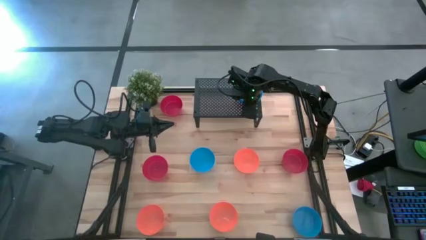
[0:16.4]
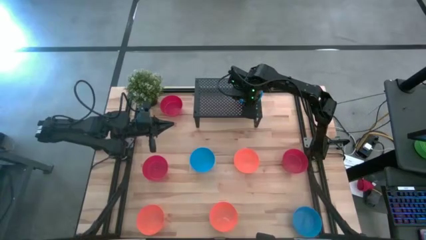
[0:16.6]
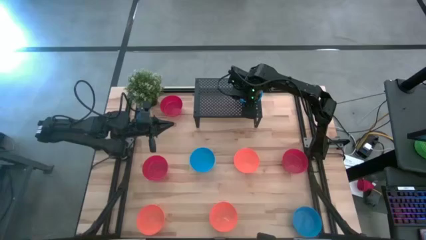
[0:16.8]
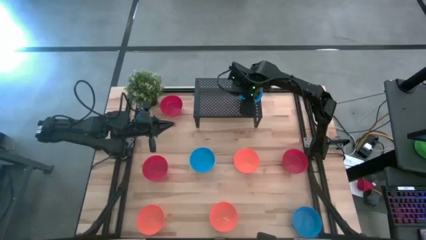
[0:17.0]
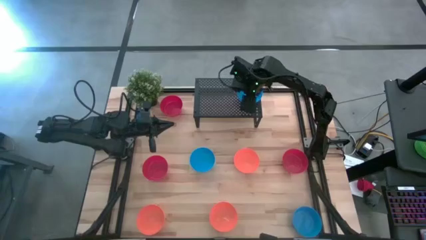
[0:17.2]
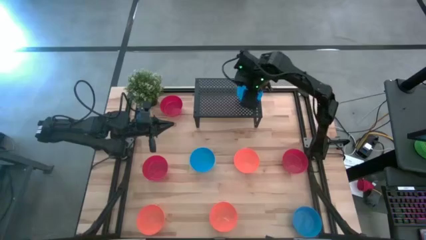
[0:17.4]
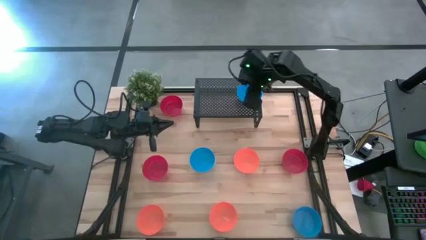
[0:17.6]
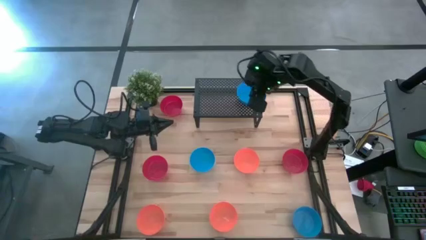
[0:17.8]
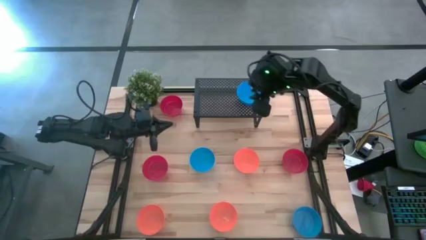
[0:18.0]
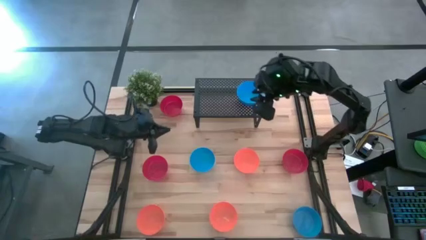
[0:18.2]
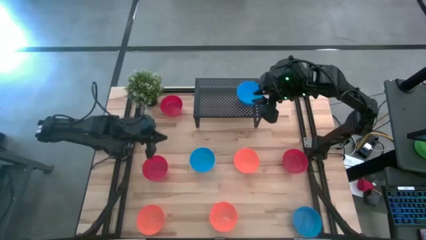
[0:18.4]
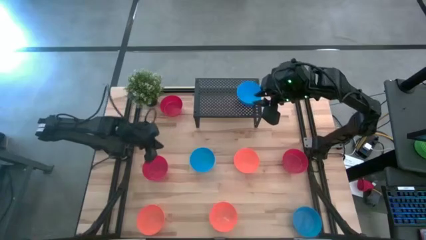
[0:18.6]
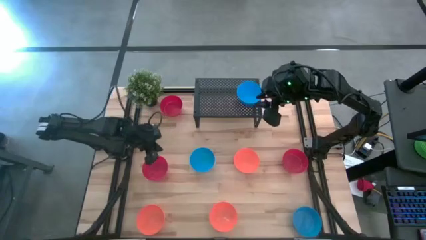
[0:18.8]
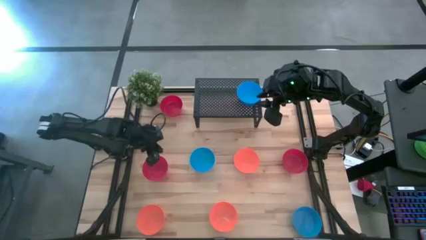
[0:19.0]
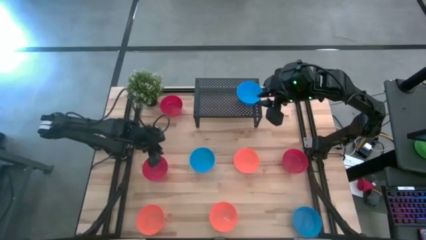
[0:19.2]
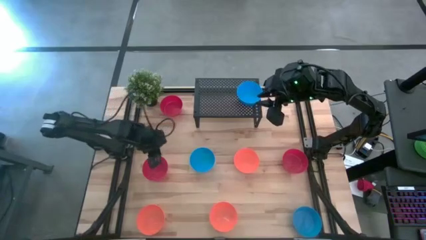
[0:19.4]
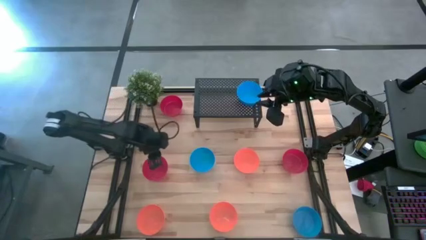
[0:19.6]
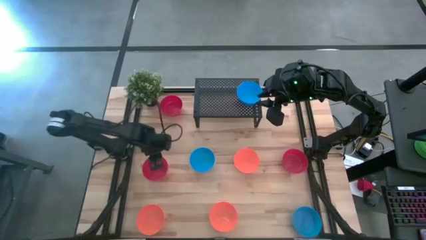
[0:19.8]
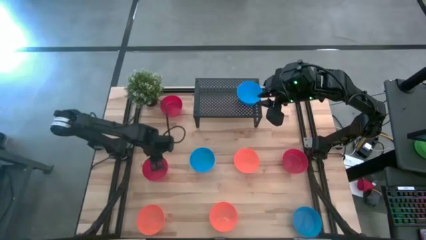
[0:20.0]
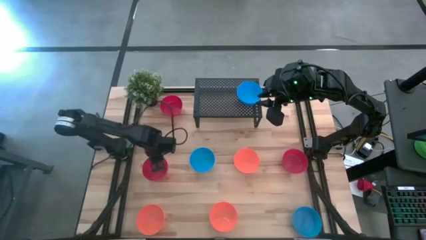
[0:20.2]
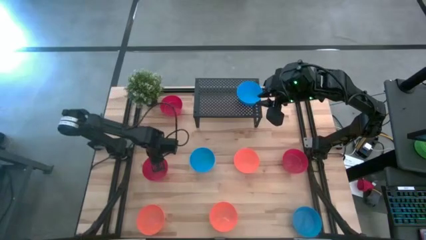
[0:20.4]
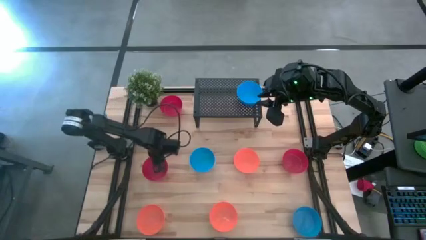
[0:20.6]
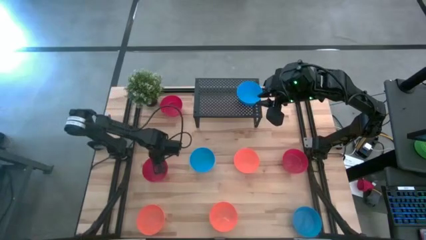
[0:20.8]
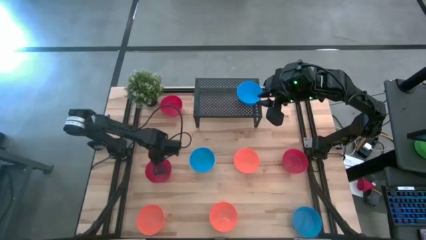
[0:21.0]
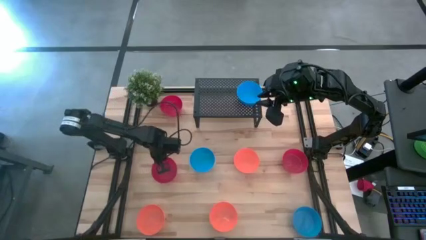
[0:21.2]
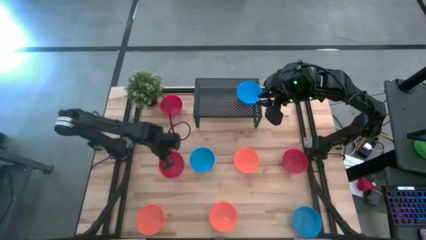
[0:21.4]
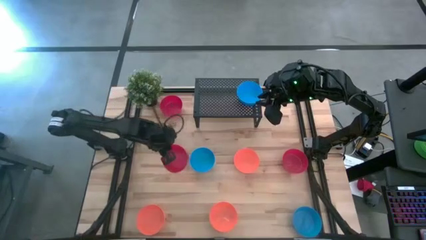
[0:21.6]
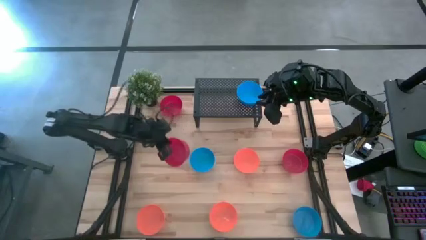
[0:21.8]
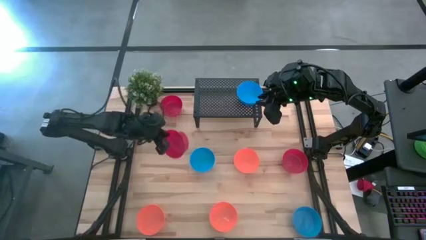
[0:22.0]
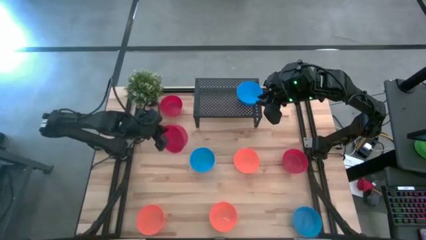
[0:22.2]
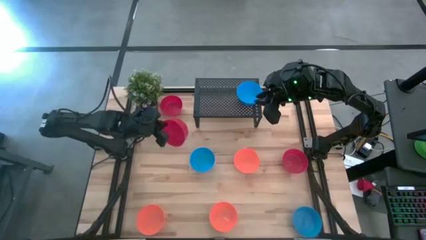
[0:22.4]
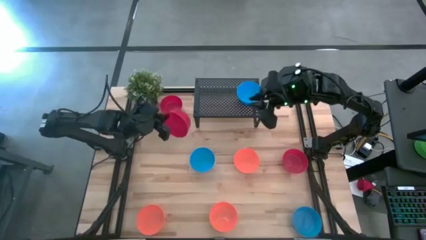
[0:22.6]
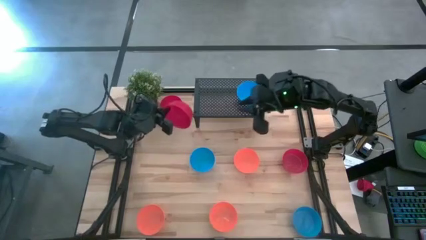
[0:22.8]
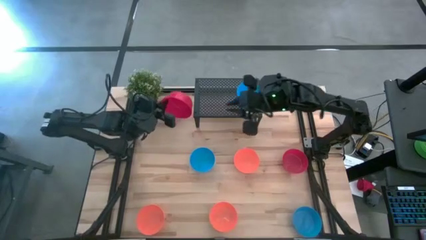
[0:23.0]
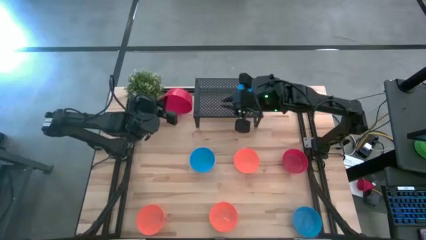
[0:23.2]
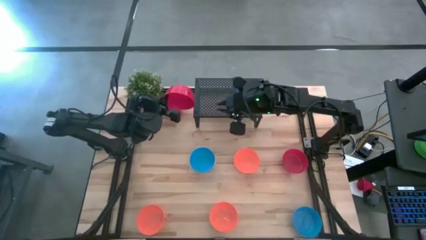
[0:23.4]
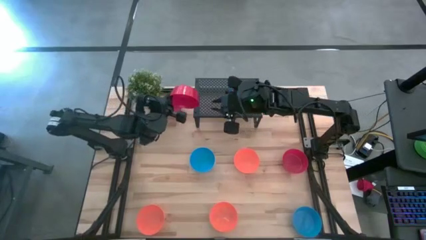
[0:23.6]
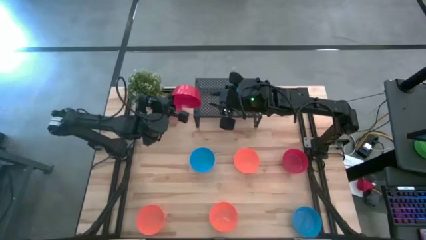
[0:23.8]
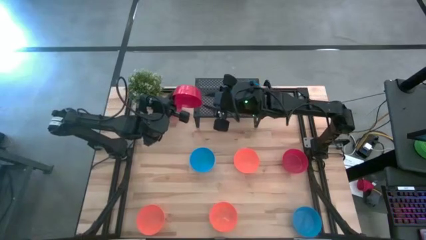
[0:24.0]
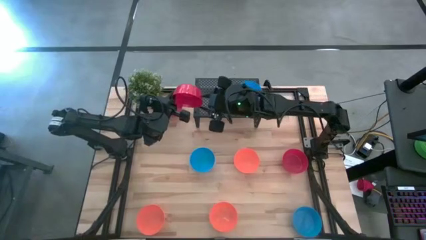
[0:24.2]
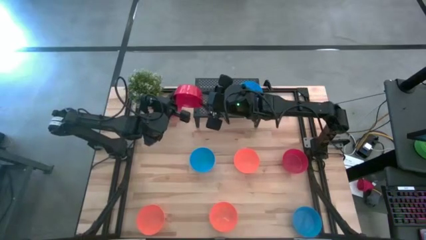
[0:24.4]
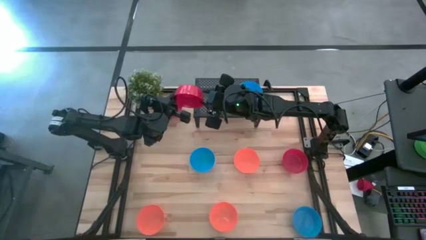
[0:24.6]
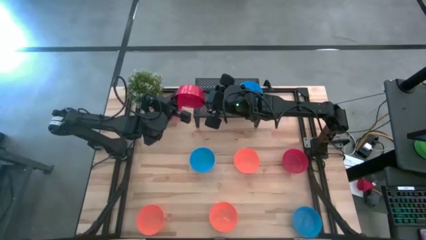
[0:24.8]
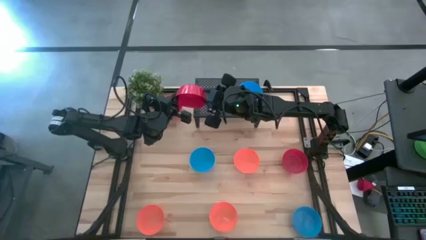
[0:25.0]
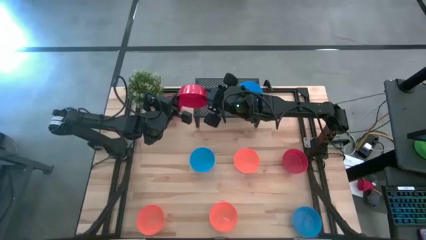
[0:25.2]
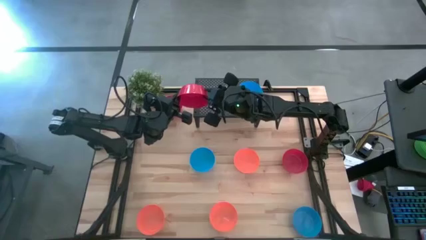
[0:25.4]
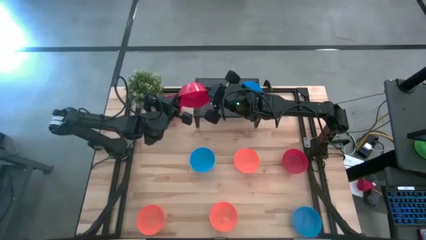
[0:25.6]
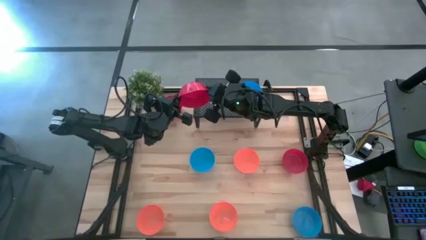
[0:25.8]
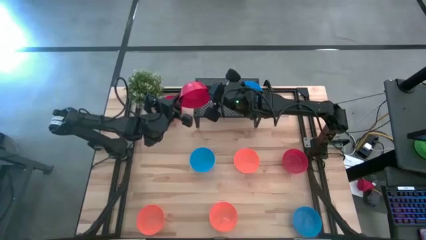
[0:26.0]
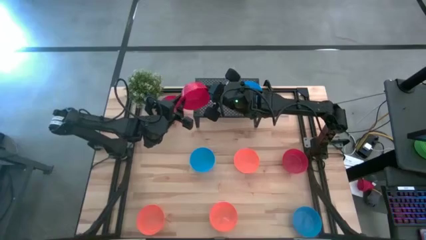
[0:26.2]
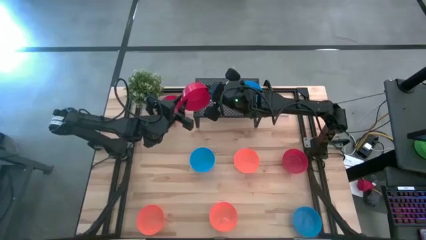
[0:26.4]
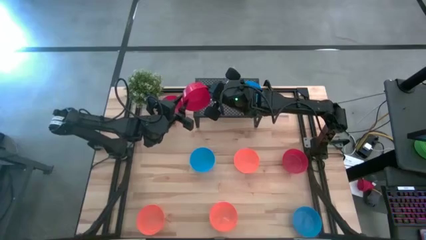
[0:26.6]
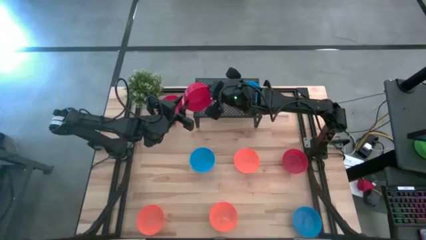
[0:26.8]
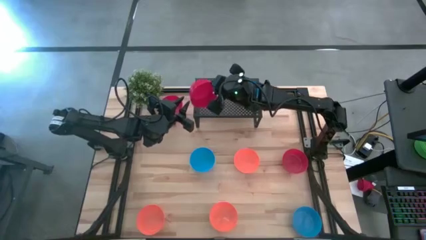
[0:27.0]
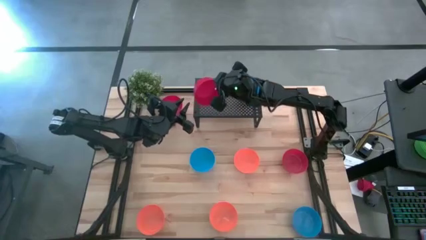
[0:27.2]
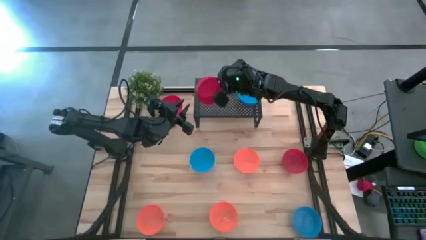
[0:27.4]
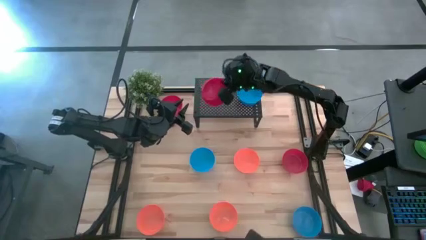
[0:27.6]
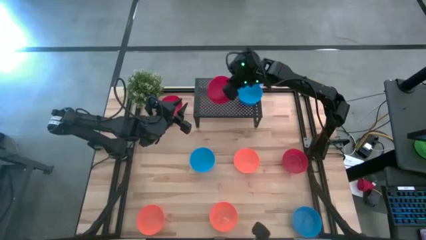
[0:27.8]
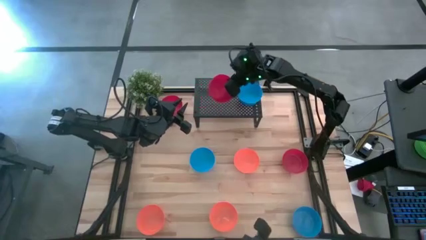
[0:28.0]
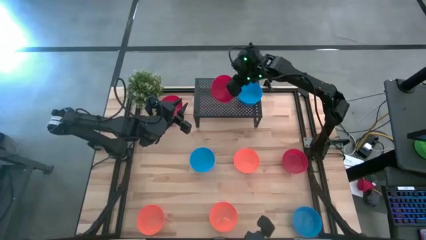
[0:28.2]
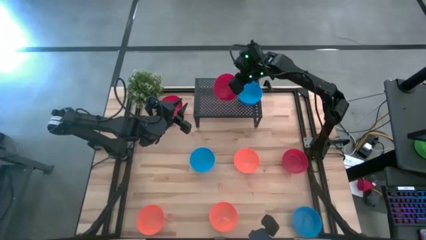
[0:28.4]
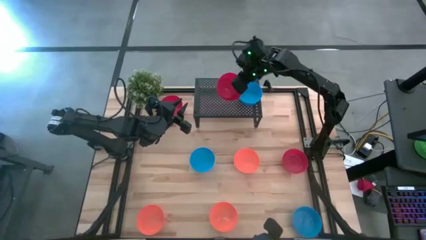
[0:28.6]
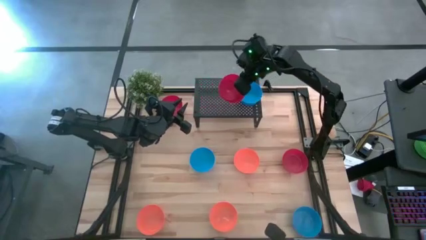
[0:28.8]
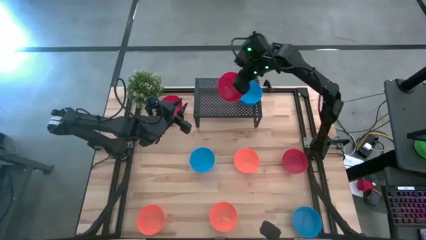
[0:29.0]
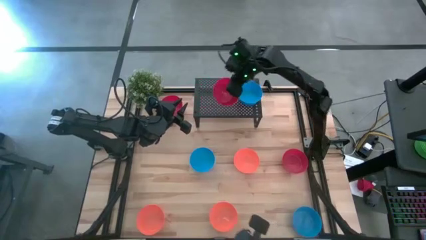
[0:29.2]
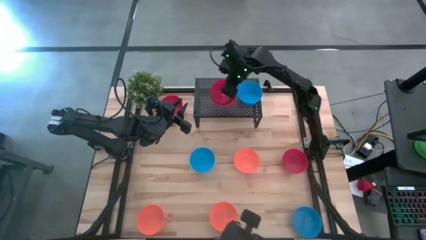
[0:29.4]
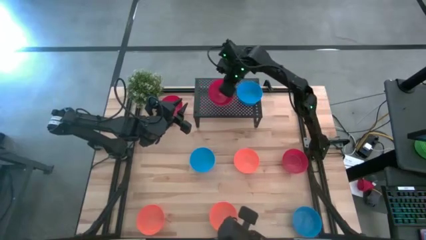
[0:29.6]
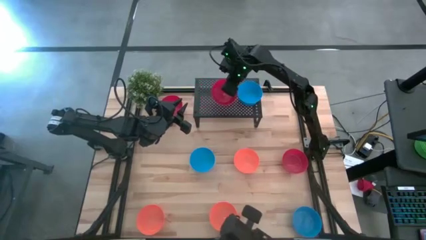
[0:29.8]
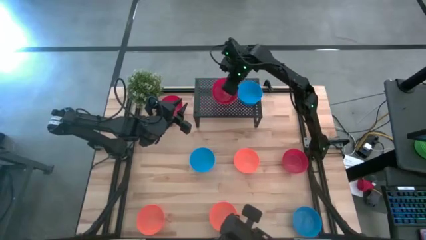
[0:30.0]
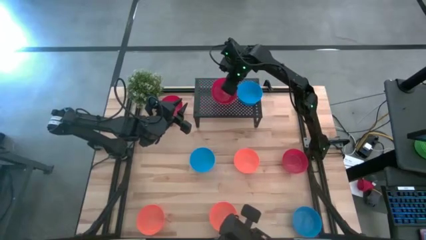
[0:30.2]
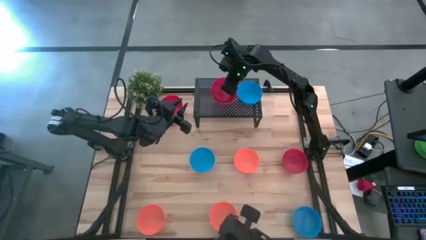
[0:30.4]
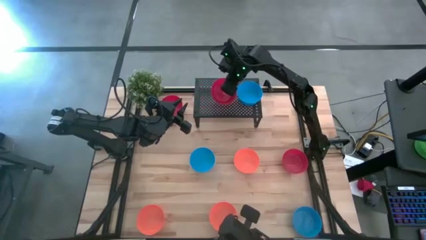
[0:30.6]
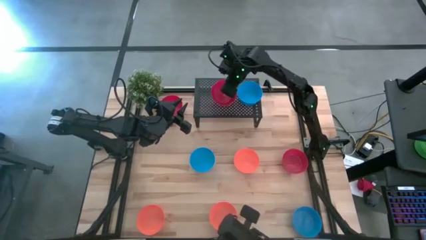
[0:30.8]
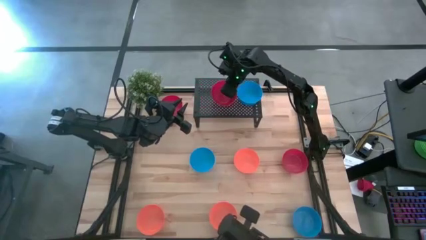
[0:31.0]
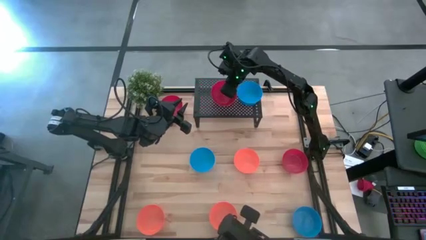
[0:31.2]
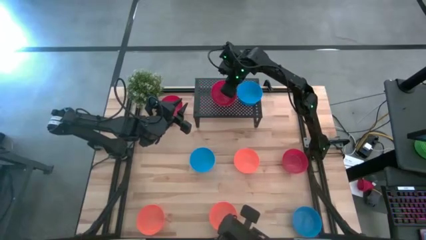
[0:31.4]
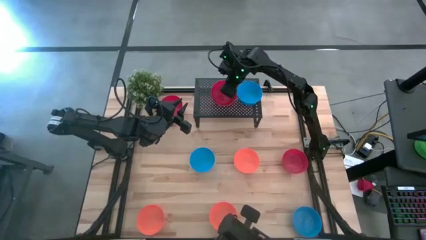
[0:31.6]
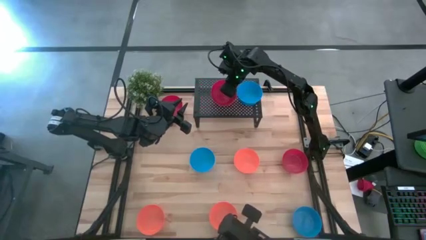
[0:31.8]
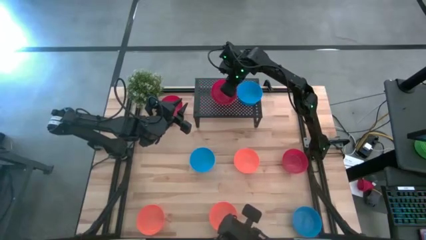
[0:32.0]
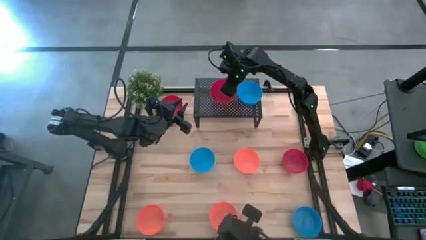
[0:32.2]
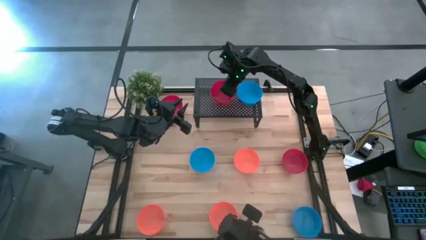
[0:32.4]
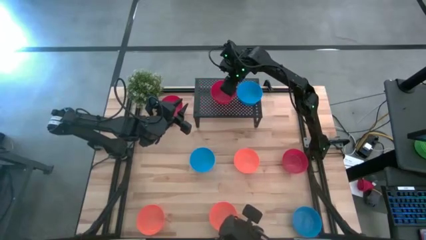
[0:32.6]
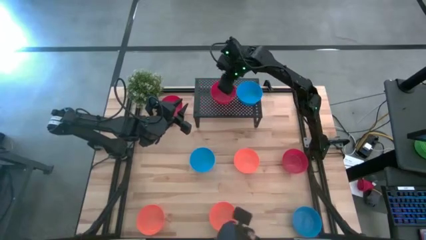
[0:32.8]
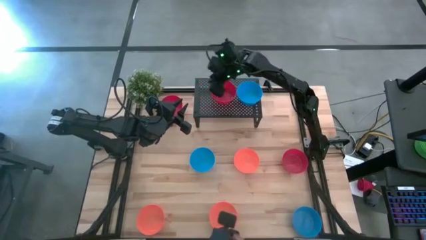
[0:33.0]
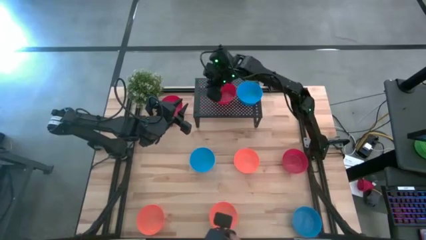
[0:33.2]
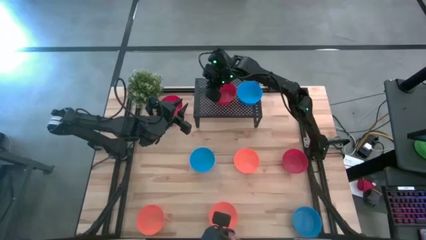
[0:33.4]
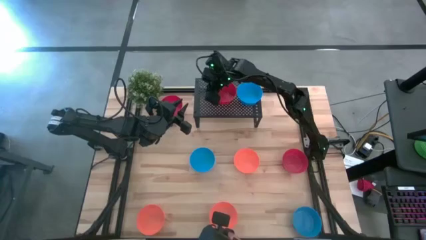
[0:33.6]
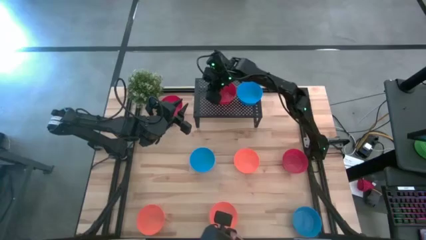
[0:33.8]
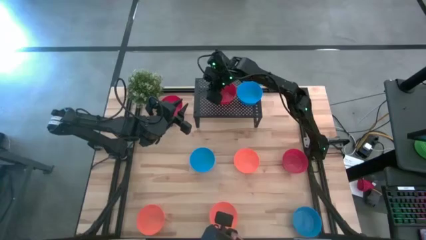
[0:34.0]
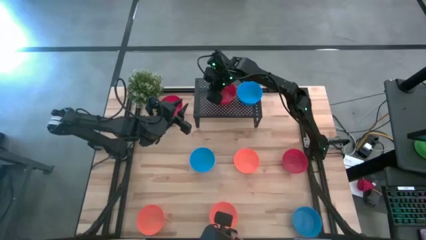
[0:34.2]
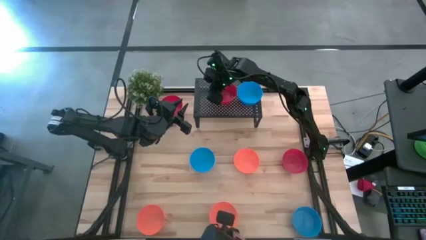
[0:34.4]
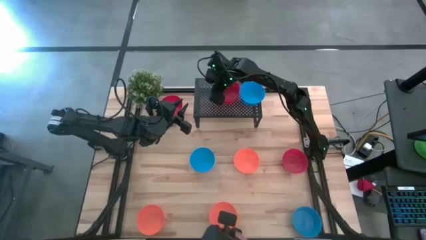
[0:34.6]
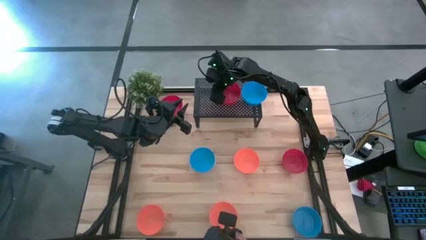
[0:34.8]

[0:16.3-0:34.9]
Task: Pick & Place Mini bowls
Put the bottom left red bowl on the shelf
